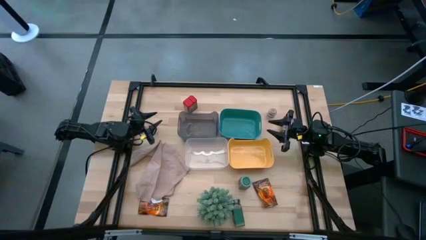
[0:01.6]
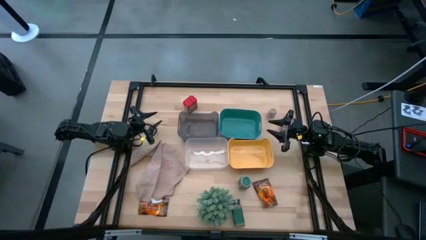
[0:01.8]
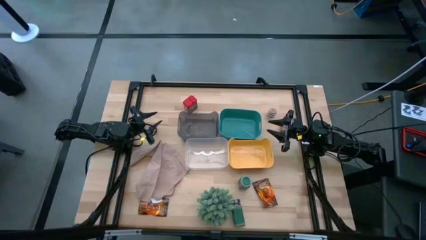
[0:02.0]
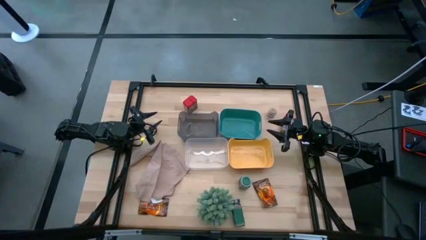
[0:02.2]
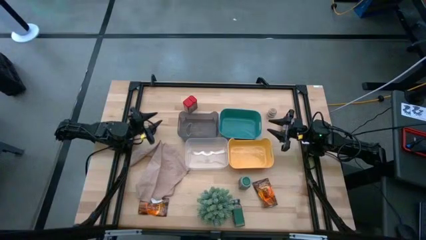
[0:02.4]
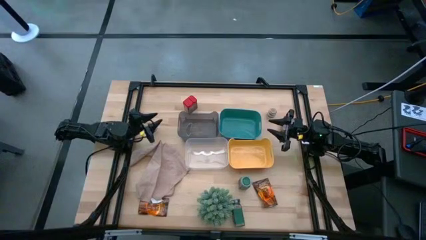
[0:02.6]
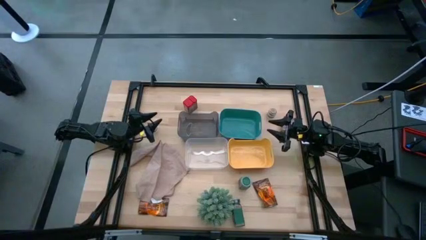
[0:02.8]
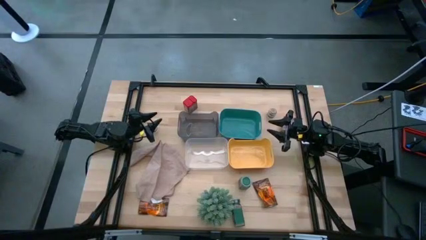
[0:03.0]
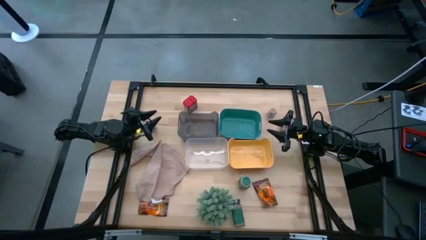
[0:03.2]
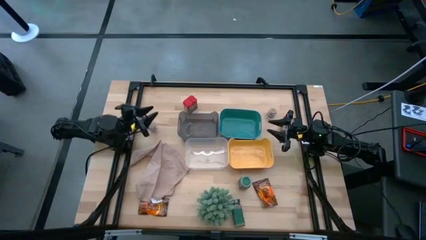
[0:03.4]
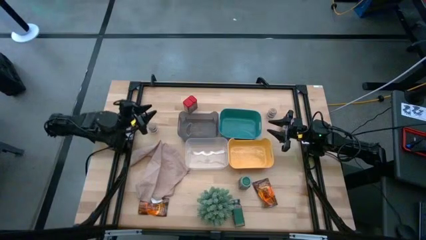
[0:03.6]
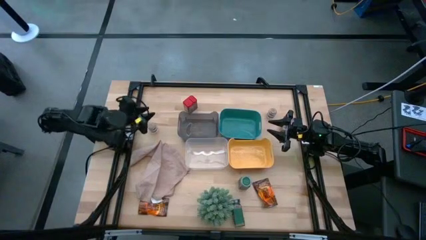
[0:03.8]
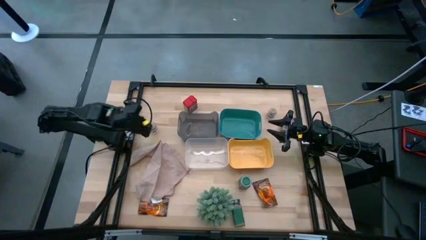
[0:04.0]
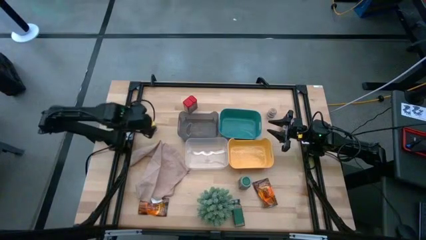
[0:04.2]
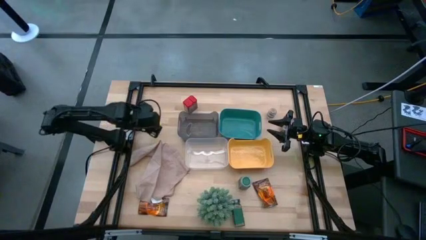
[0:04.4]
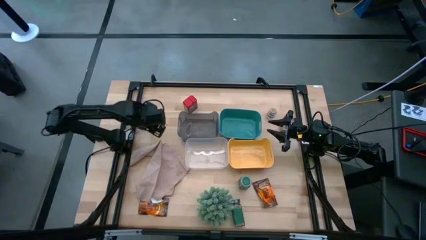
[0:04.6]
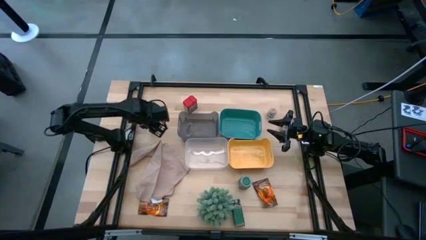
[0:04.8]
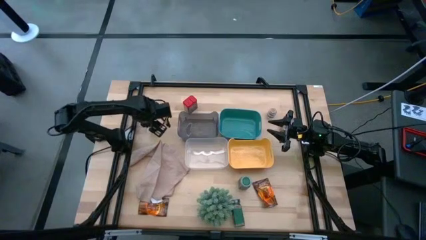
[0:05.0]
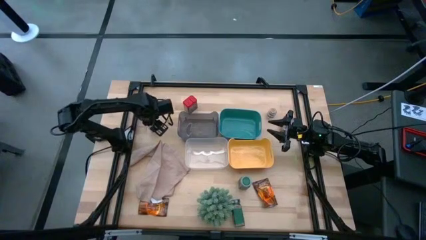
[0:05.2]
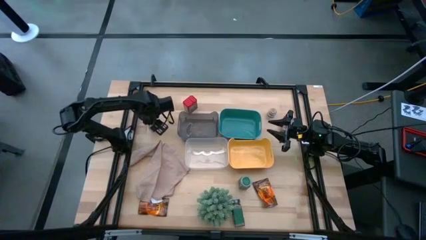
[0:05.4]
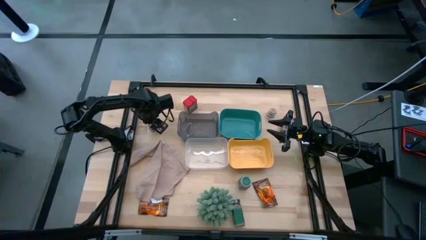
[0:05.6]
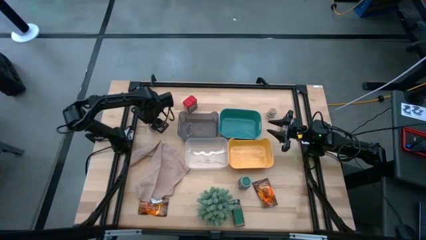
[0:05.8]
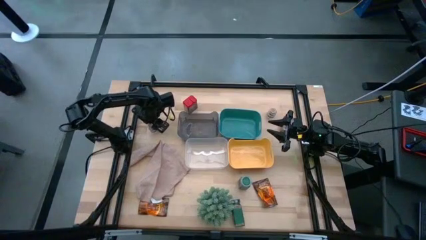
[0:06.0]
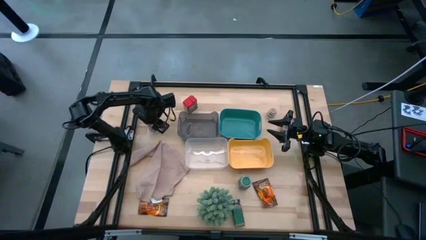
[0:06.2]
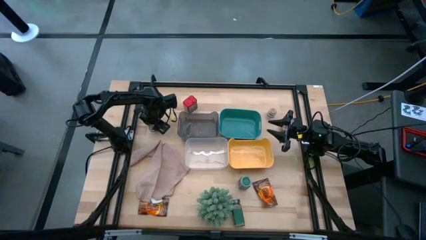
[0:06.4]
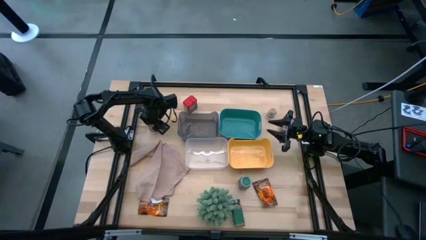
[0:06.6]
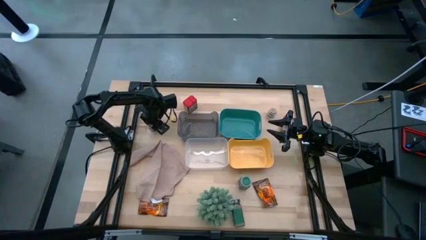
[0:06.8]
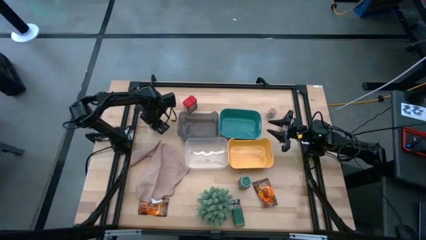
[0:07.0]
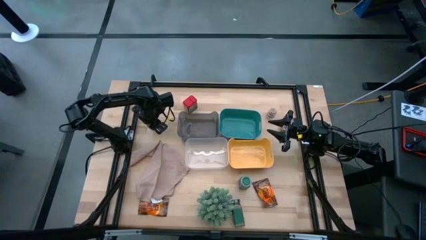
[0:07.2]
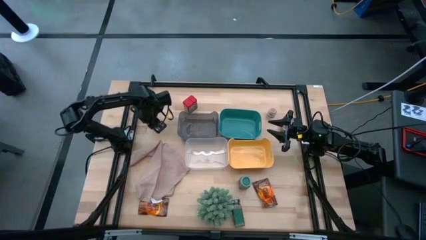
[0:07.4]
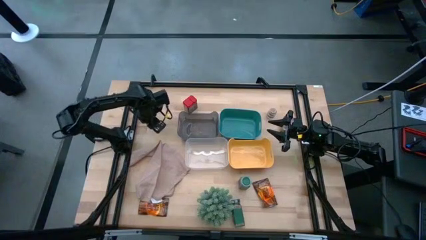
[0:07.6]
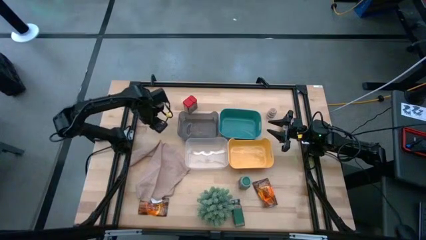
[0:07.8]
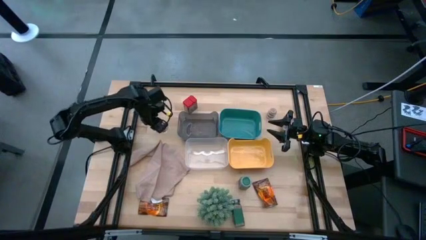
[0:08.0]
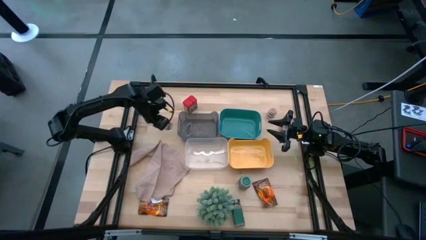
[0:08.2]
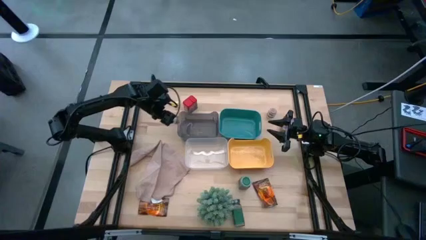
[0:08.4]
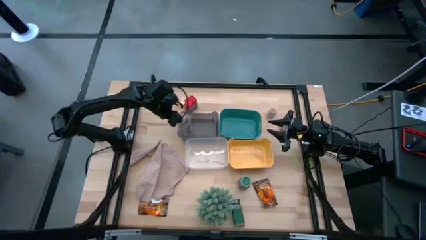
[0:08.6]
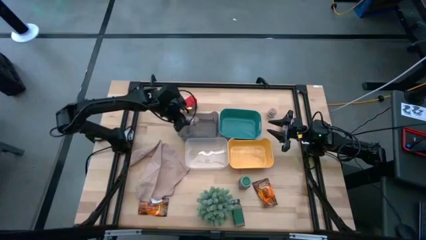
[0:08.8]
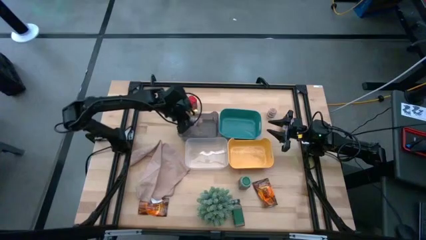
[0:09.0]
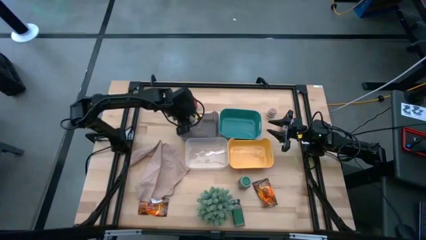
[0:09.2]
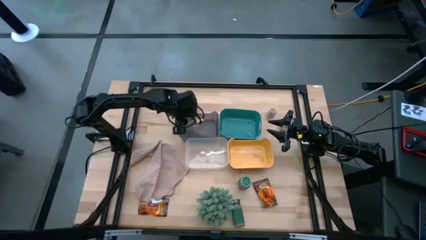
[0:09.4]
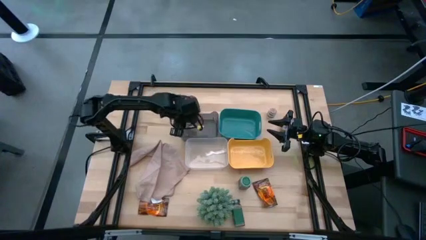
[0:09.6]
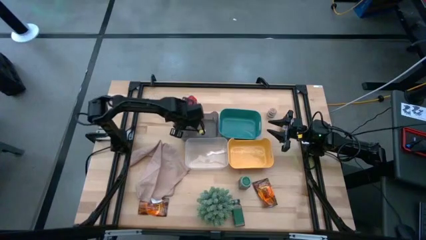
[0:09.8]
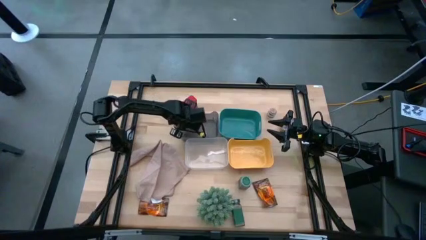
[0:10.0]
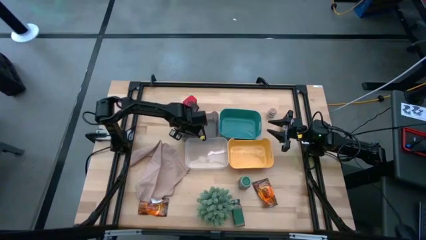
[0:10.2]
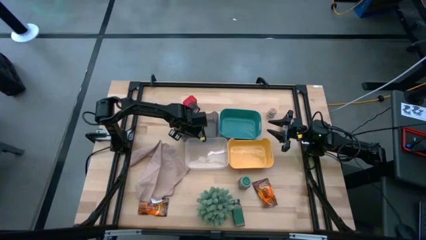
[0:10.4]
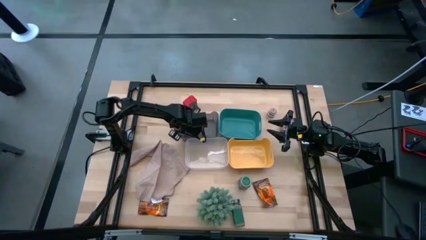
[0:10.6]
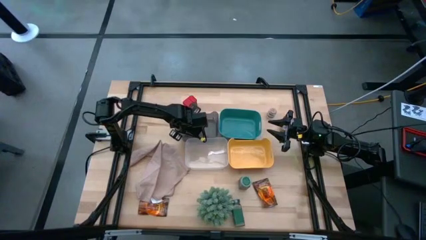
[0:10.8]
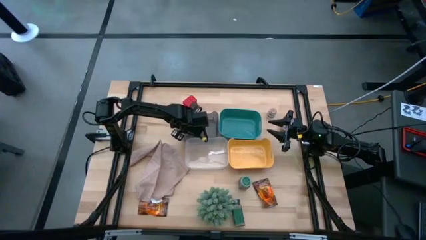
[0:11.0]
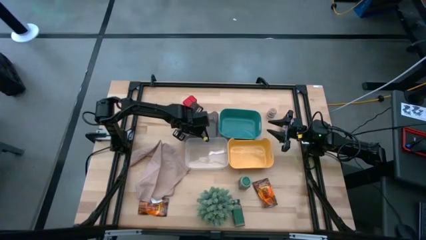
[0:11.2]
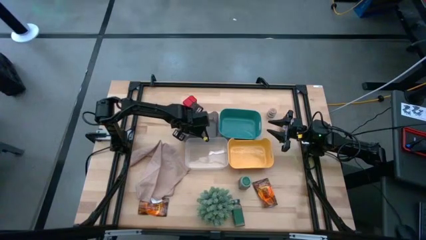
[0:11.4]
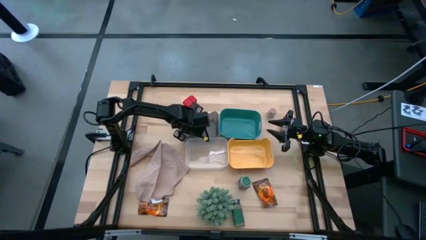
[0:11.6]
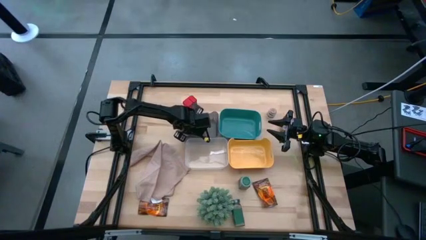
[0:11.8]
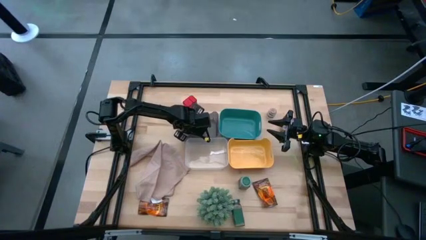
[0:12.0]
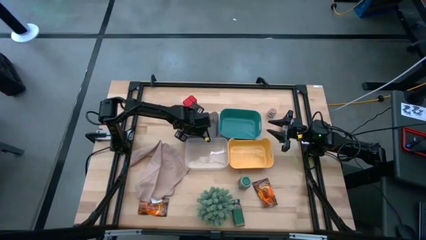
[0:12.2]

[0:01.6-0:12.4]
Task: Sort spices by type
Put the left brown seasoning bottle into the black bin
